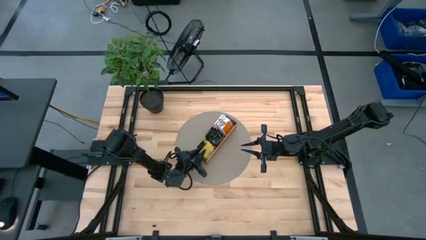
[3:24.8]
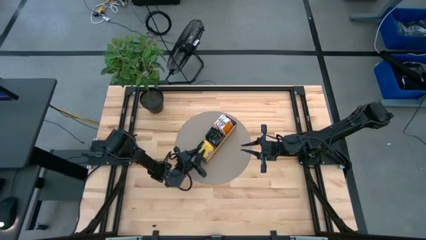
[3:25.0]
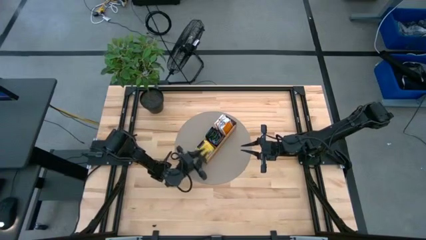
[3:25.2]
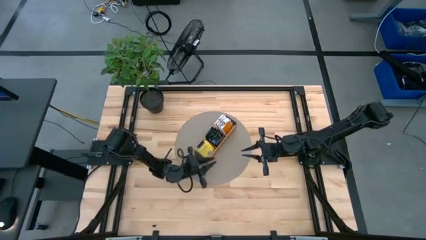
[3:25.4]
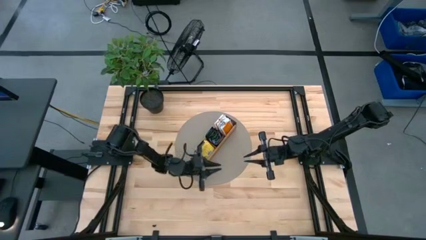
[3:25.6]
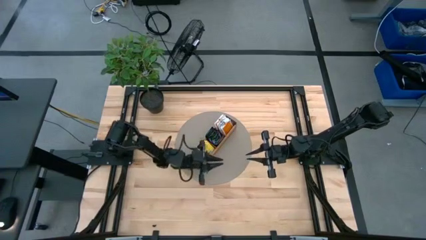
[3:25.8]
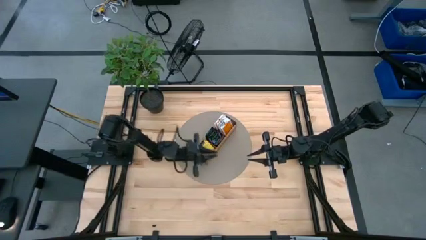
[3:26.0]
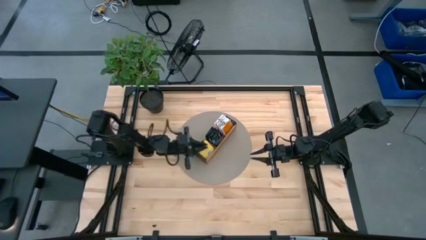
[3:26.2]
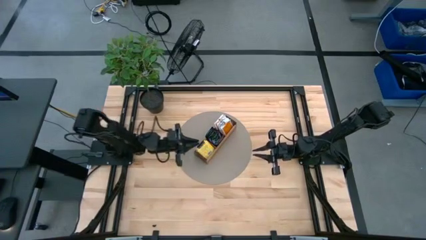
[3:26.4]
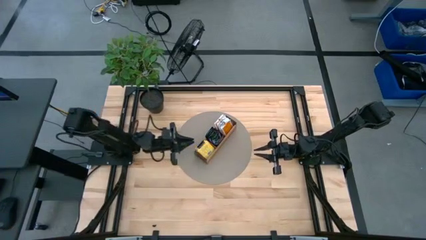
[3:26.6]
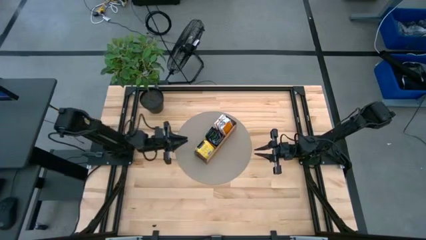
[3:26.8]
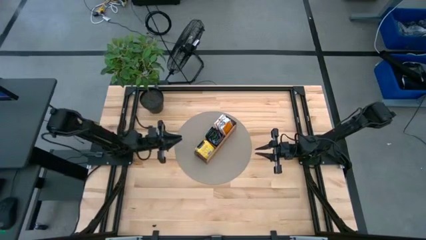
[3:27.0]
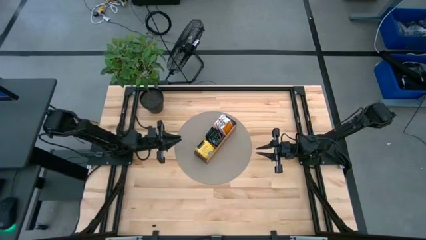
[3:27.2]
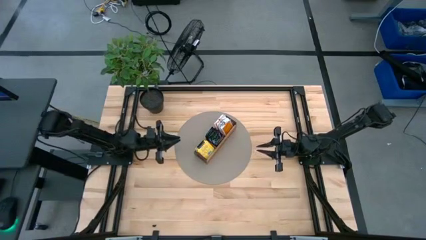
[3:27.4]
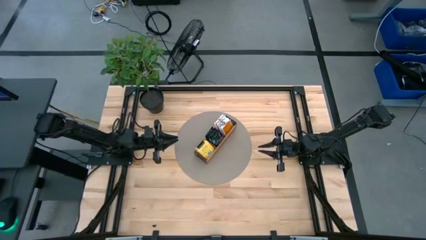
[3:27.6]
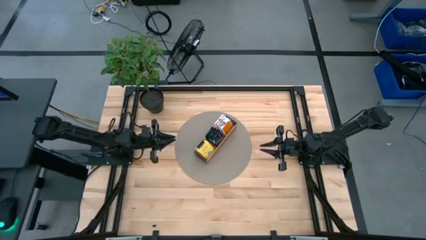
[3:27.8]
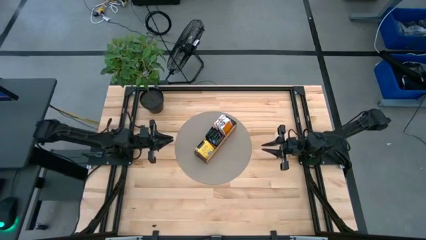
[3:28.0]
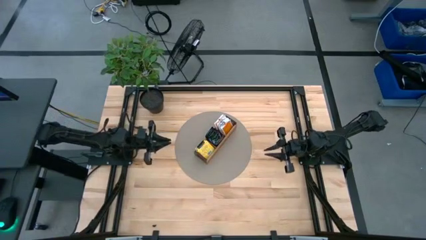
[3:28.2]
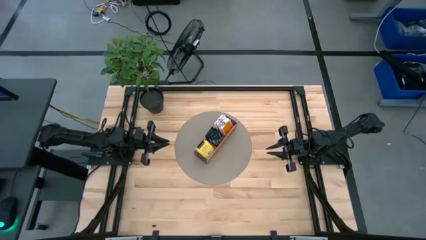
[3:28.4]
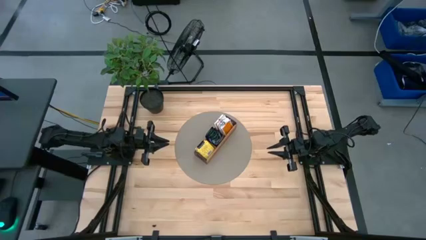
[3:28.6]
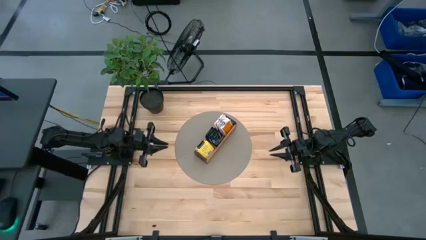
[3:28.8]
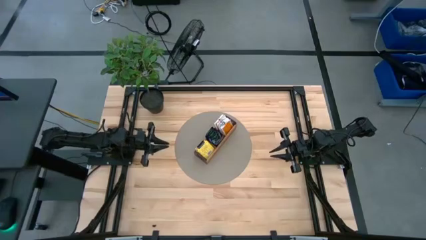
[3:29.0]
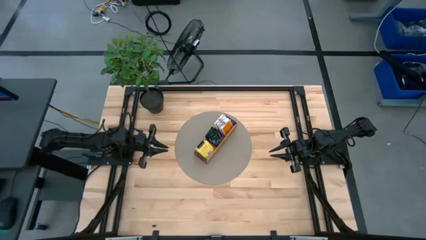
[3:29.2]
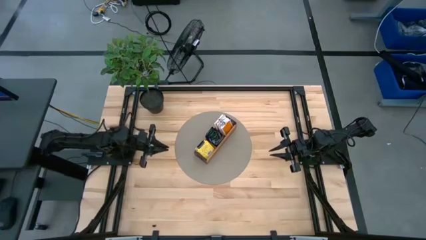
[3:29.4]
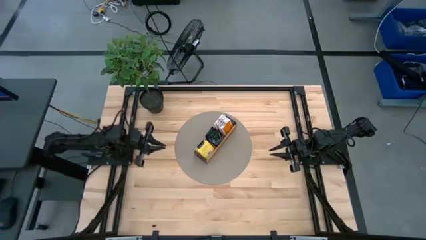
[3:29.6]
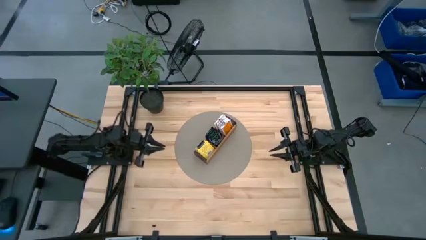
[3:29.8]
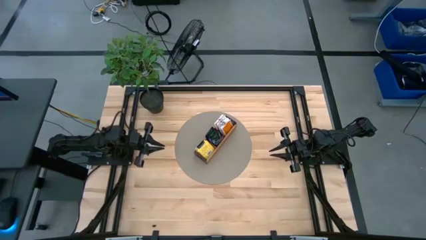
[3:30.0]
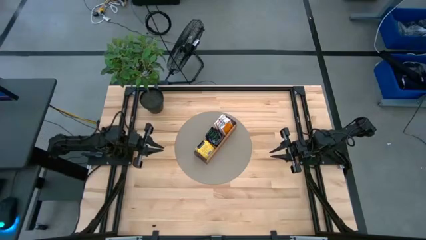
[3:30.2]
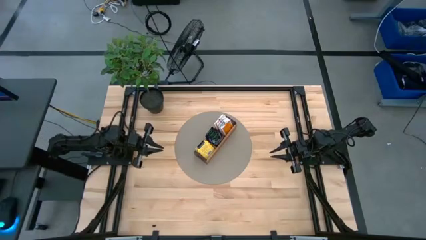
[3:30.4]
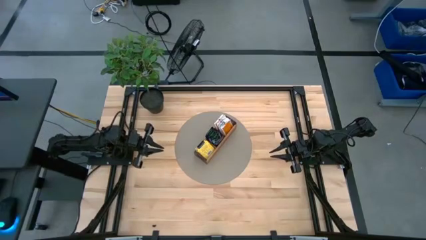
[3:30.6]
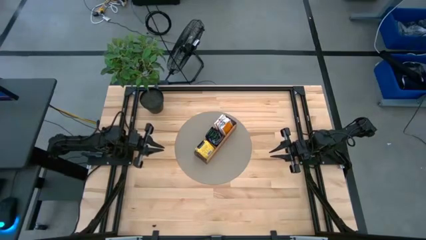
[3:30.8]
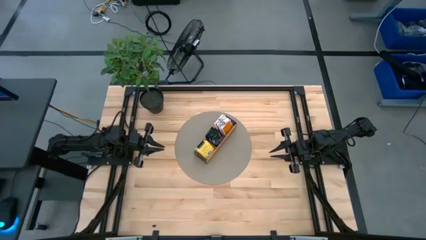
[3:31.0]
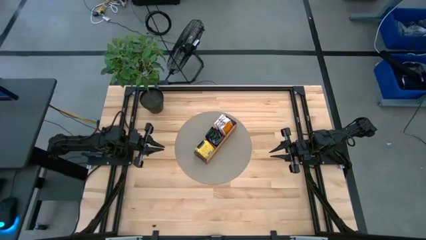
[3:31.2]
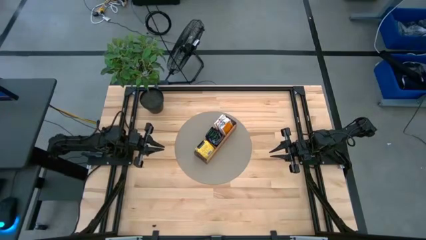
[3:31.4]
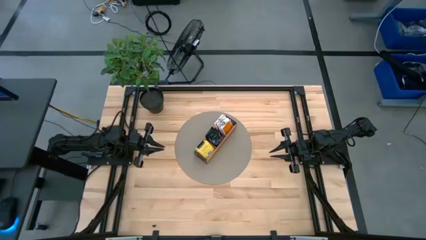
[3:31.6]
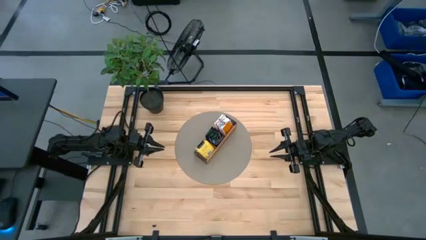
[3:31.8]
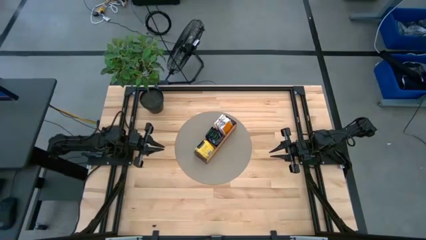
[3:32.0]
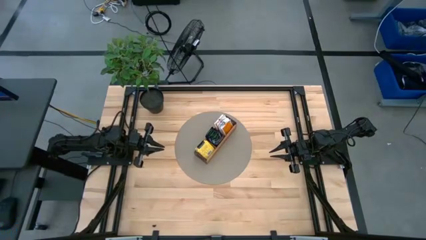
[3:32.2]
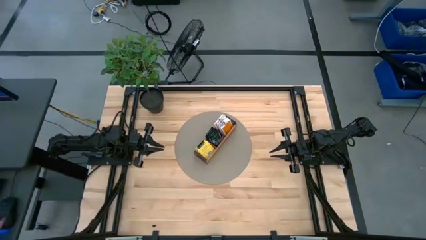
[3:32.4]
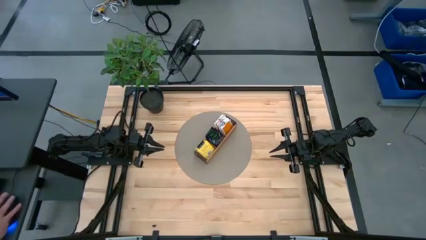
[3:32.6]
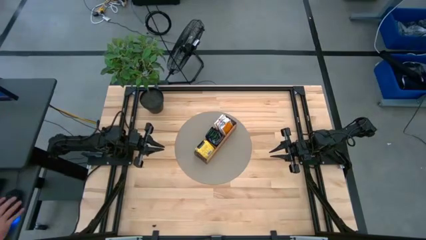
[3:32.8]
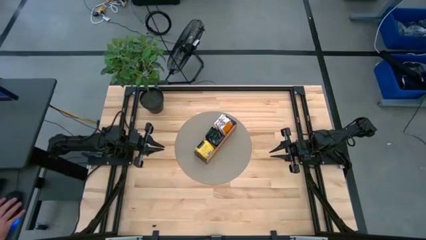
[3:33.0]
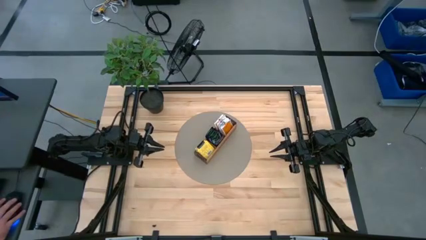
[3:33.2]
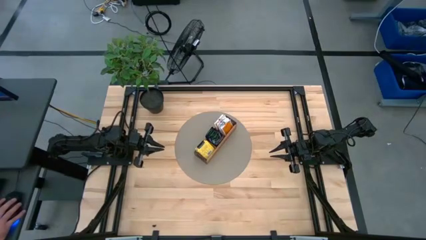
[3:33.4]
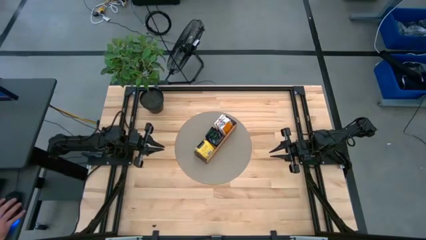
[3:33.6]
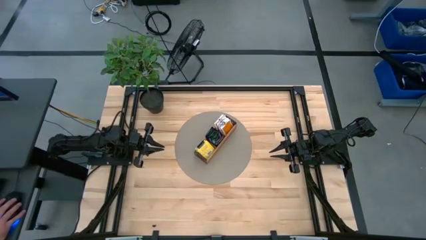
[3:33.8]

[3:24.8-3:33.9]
Task: Pick & Place Tea
Return to Home Position

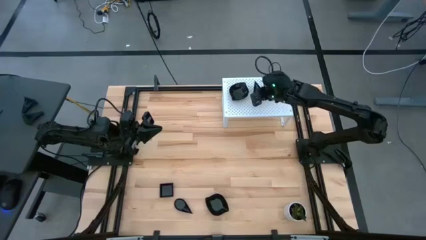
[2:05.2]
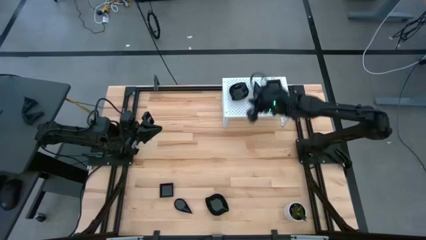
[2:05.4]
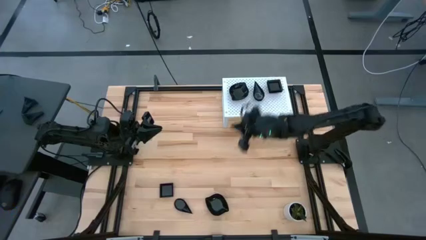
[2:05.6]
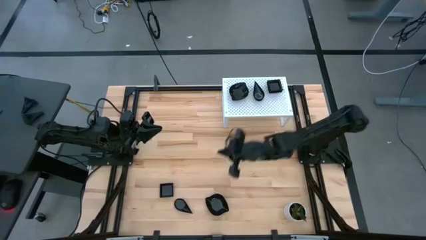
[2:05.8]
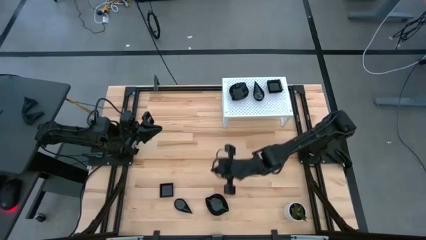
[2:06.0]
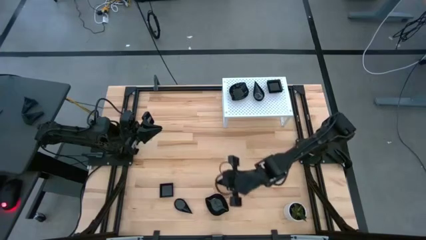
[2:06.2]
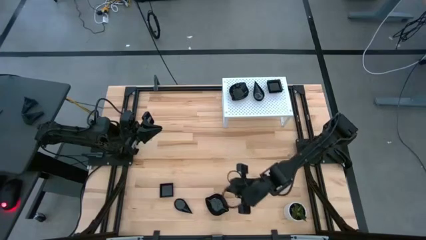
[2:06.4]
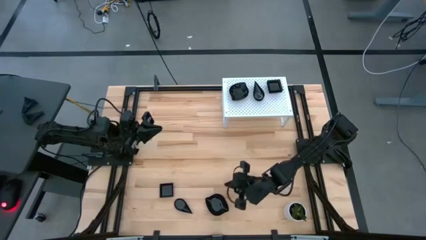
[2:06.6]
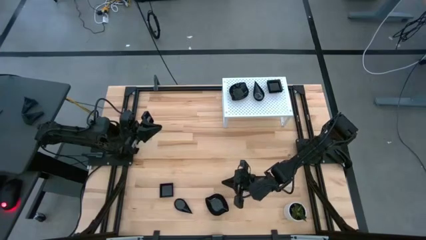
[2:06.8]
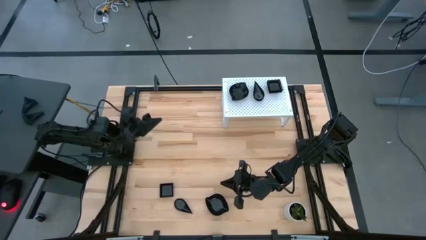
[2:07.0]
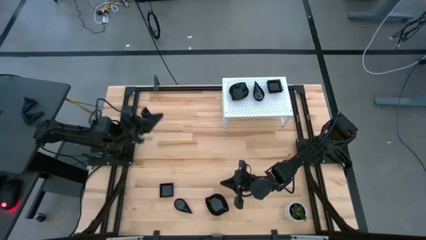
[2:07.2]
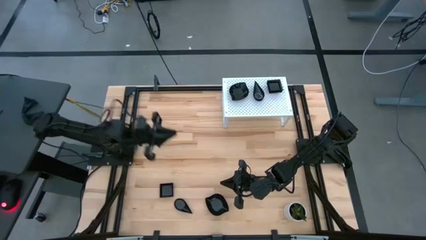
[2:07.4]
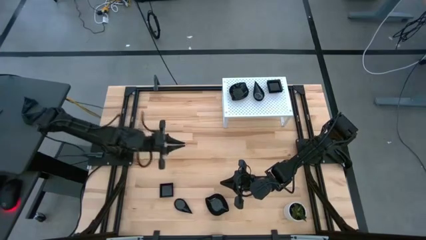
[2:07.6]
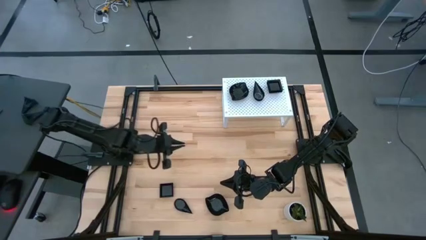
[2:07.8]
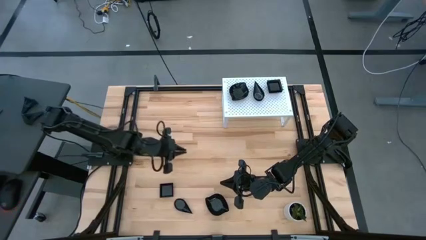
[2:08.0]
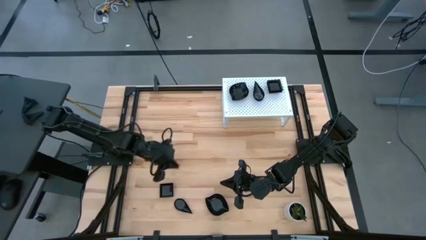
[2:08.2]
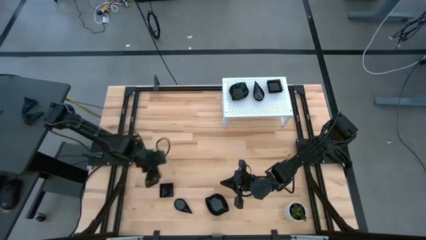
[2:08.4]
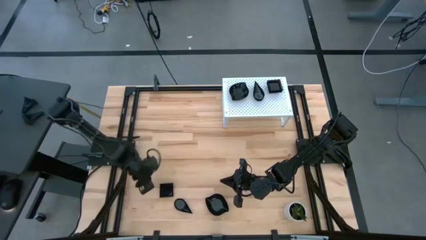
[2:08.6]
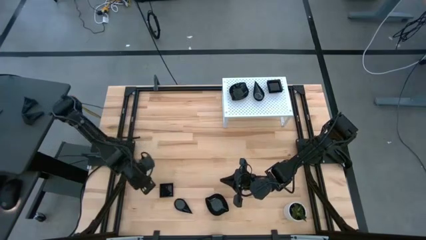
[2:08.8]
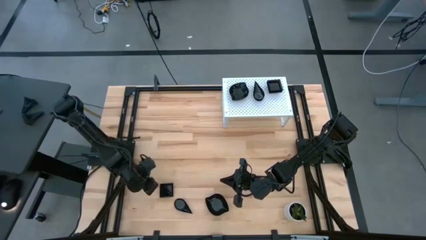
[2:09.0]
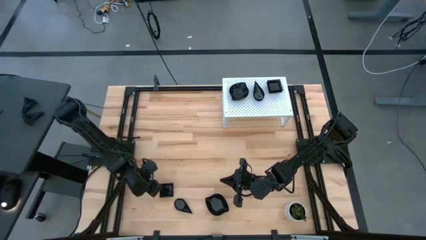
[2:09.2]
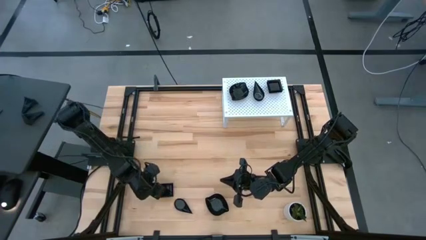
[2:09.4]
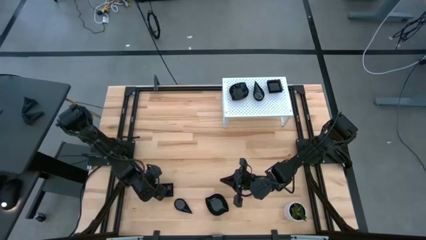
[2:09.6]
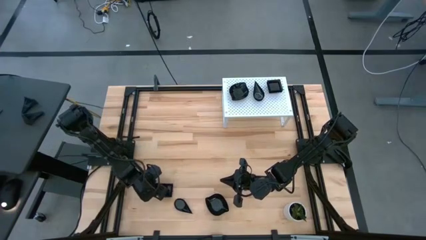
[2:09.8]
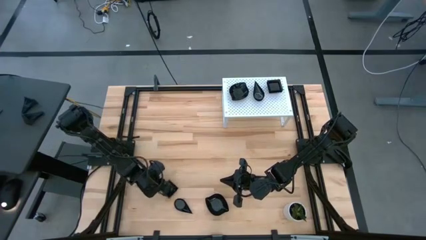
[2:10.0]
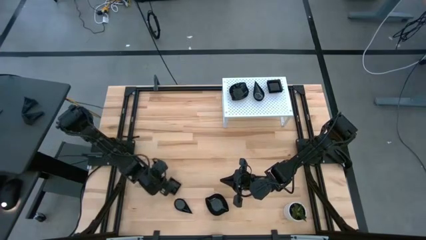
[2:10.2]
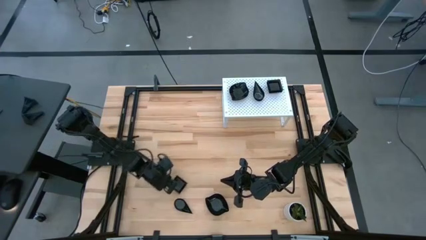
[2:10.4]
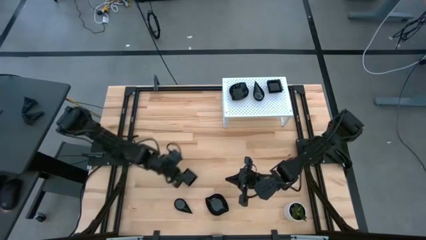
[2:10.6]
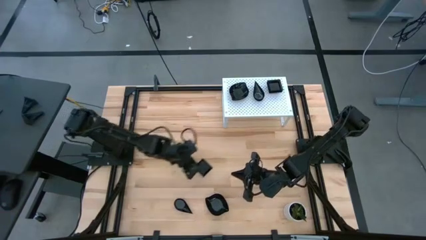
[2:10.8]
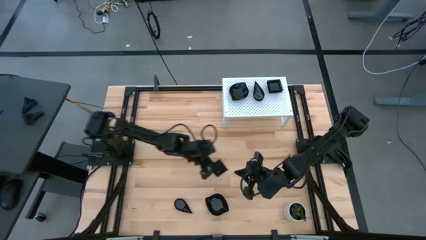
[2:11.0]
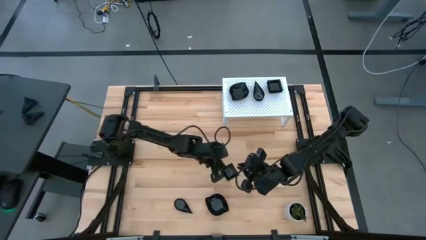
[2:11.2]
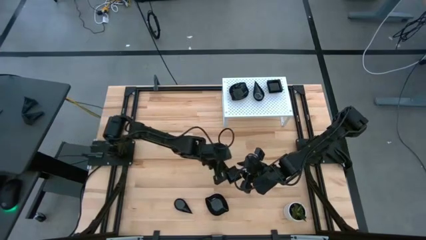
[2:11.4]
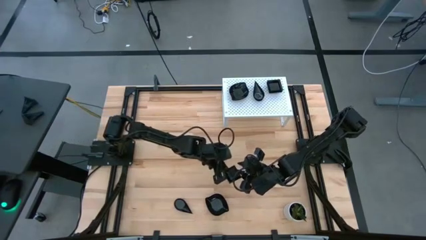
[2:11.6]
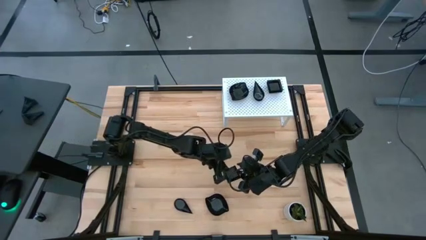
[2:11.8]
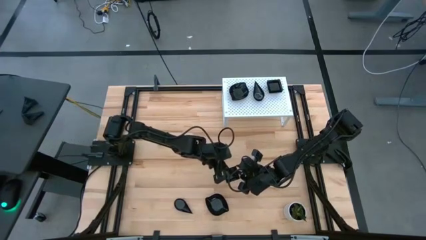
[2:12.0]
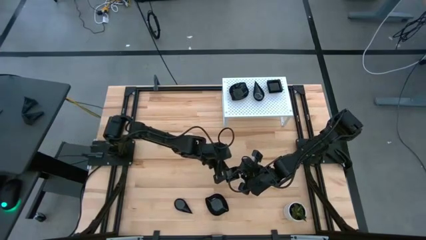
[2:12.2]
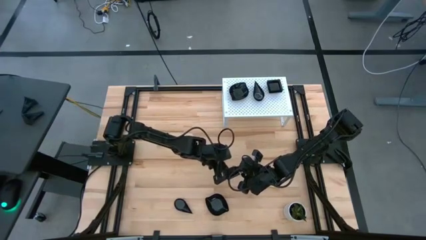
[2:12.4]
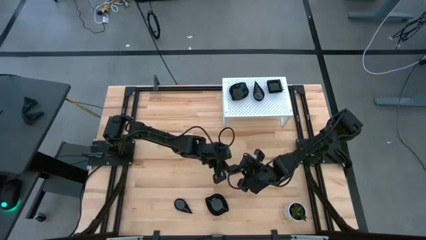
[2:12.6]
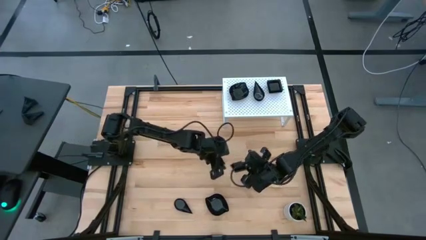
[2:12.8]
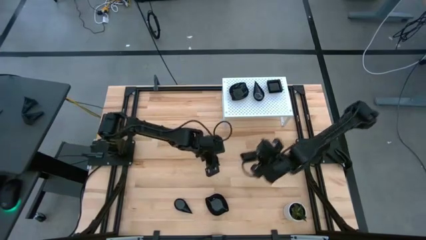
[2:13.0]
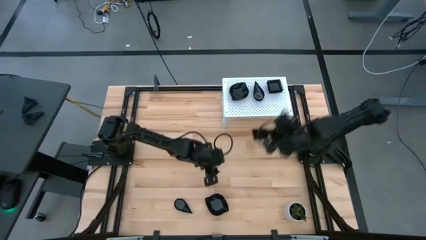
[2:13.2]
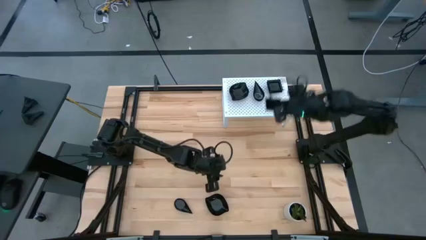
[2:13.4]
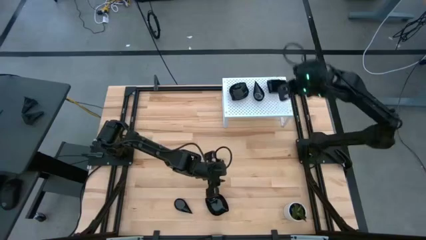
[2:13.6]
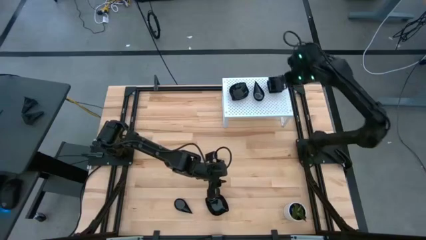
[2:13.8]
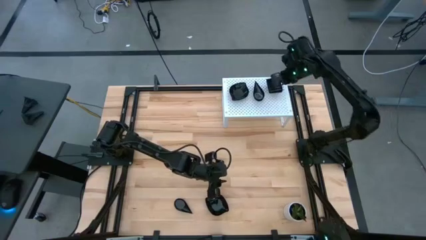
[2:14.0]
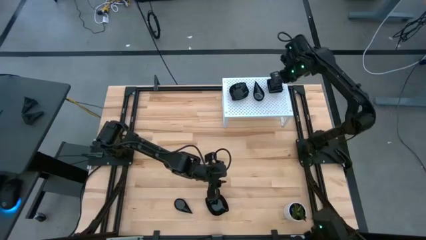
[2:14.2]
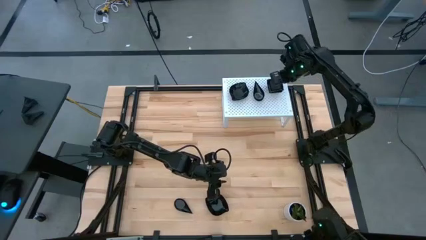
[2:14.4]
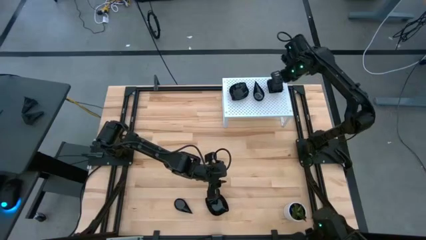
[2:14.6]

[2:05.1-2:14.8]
Task: Pick & Place Mini shaped plates
Stack the square plate on top of the square plates on the shelf
